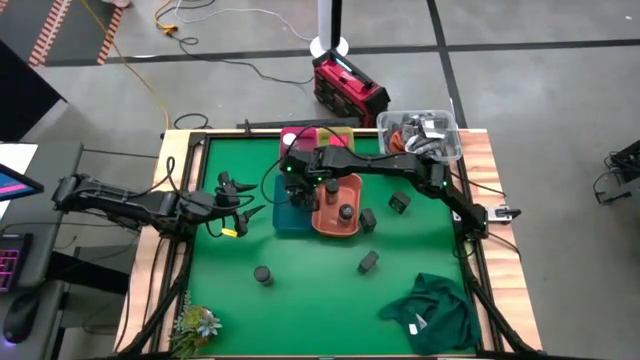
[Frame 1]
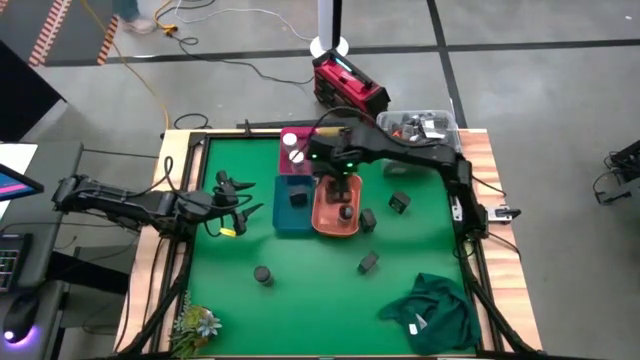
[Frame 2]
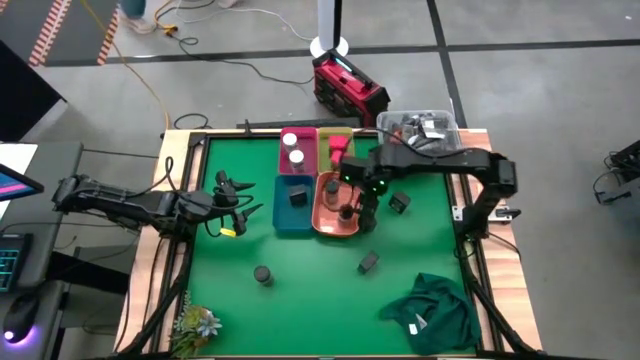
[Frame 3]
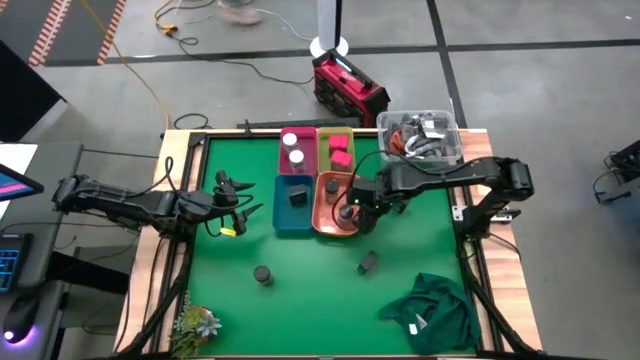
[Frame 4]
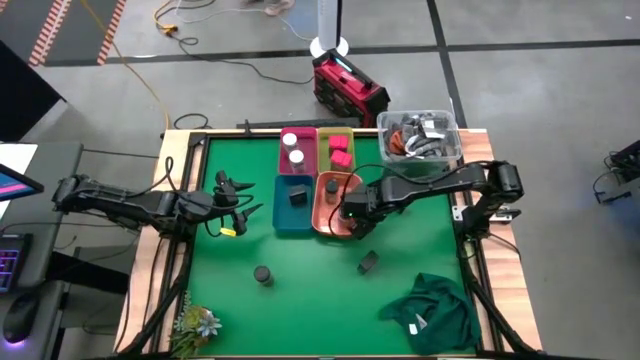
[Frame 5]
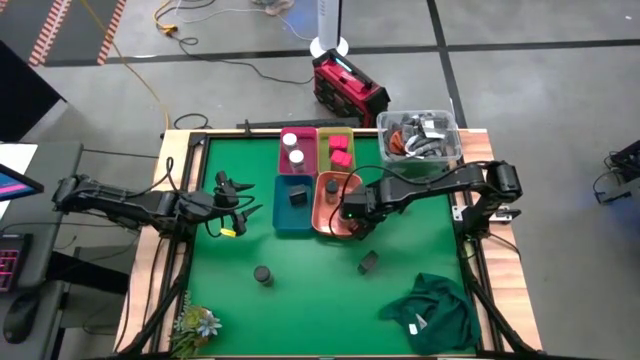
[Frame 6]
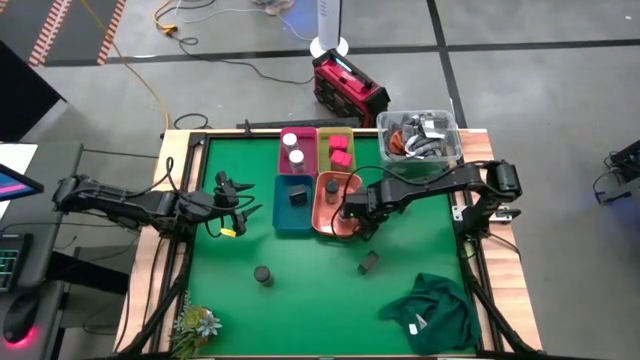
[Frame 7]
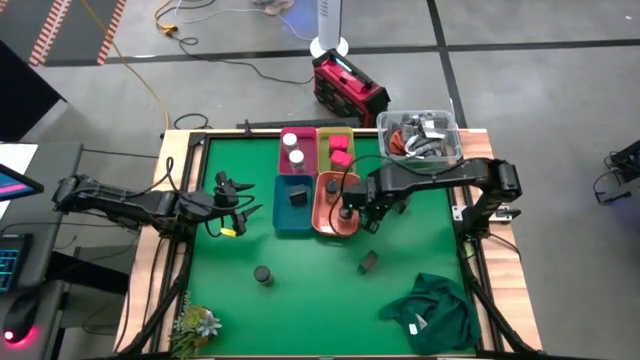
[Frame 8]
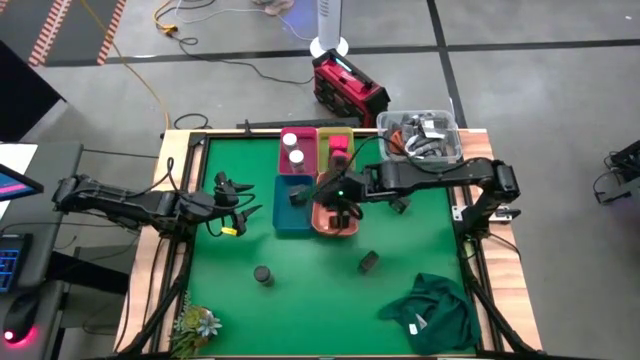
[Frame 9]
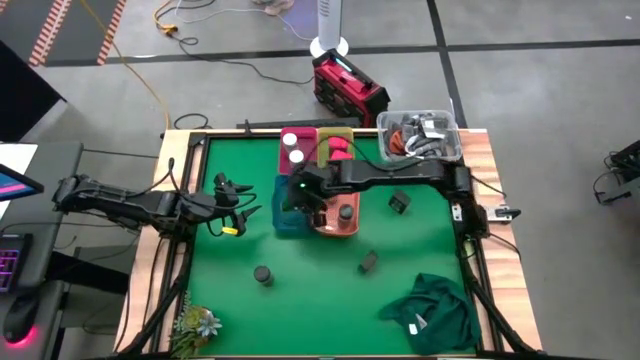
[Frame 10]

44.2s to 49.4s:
Task: Sort spices by type
Put the center black seasoning can into the blue tray

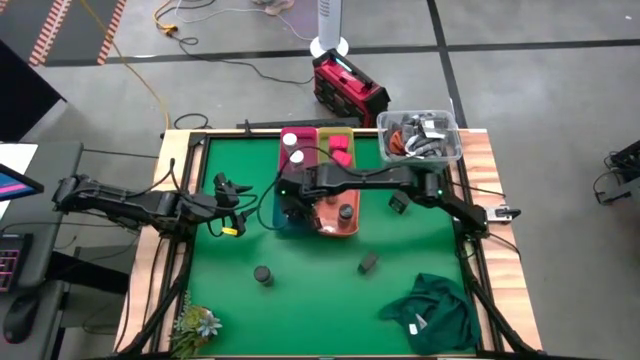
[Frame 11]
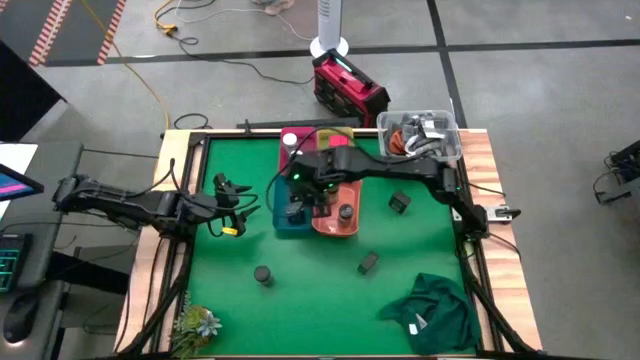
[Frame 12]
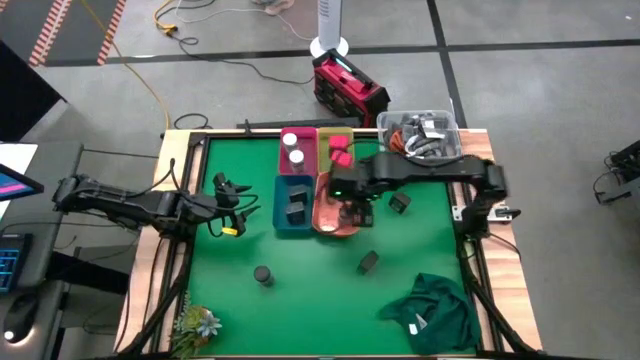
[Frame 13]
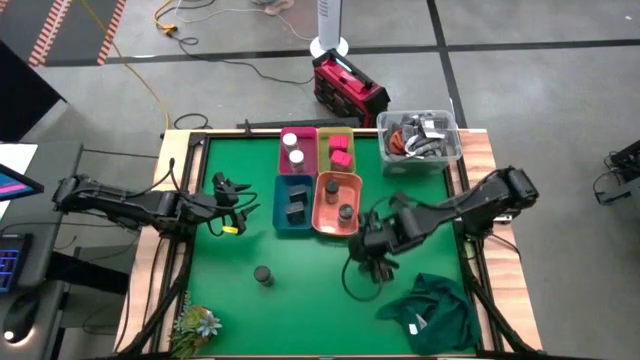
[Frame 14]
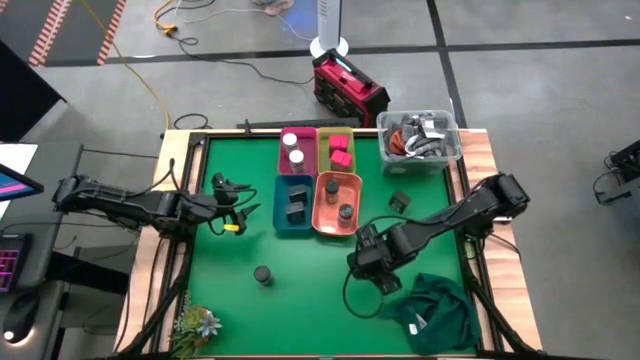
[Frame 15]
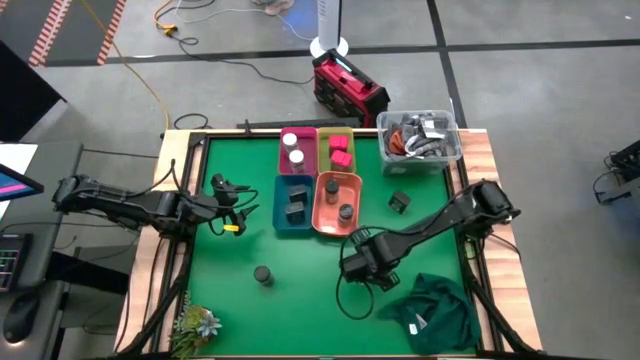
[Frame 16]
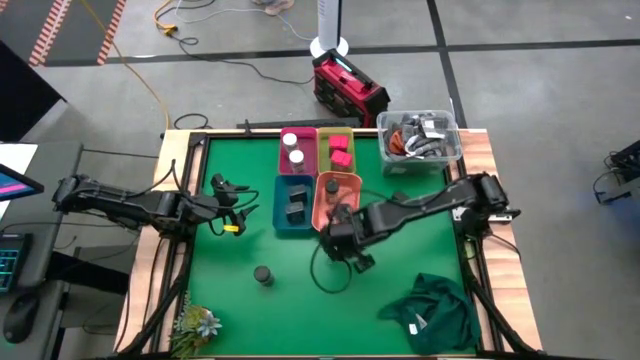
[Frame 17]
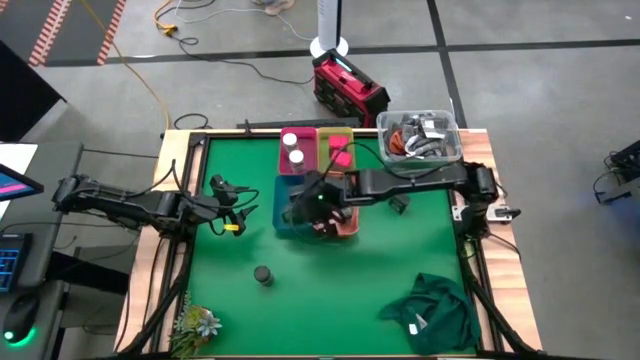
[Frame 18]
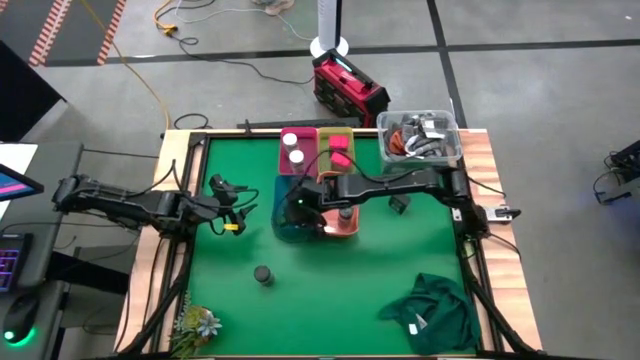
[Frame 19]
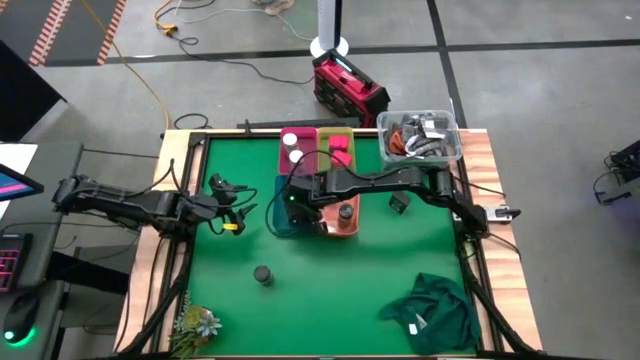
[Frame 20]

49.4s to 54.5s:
Put the bottom black seasoning can into the blue tray

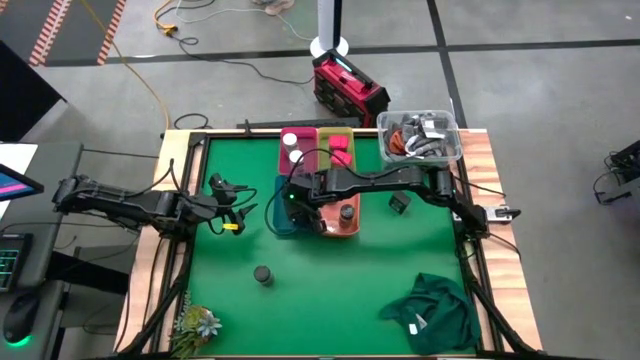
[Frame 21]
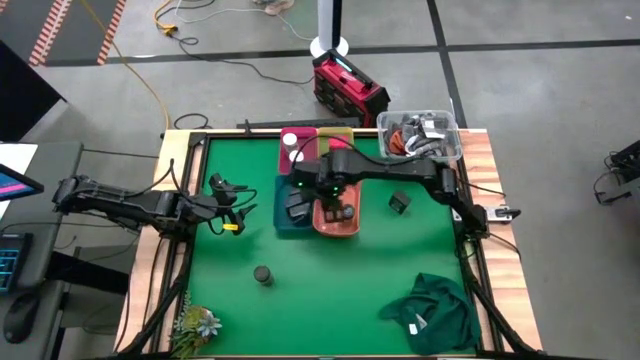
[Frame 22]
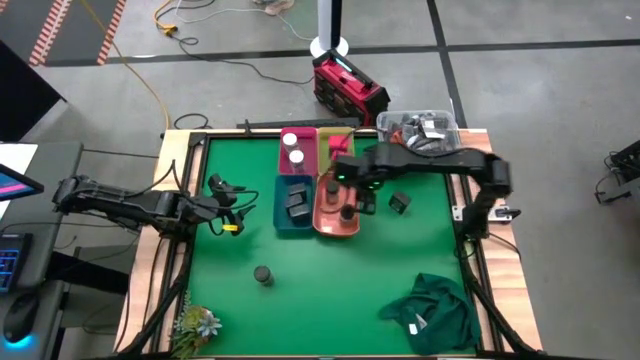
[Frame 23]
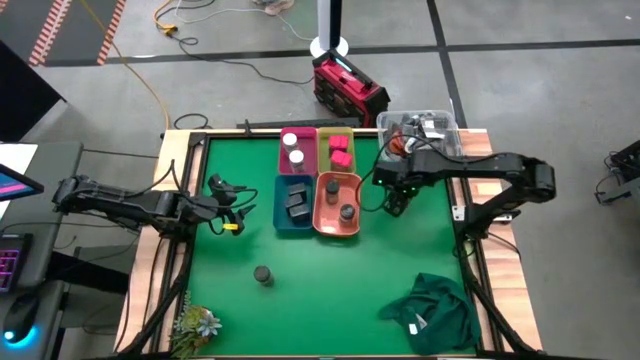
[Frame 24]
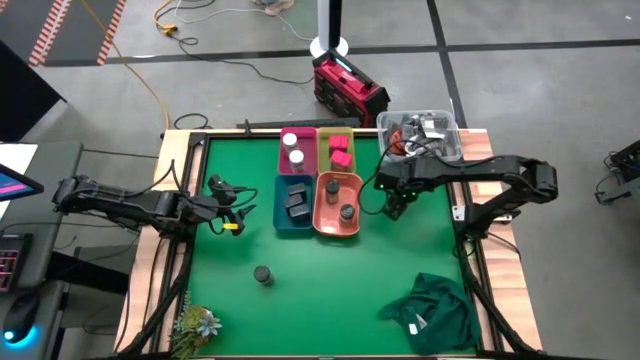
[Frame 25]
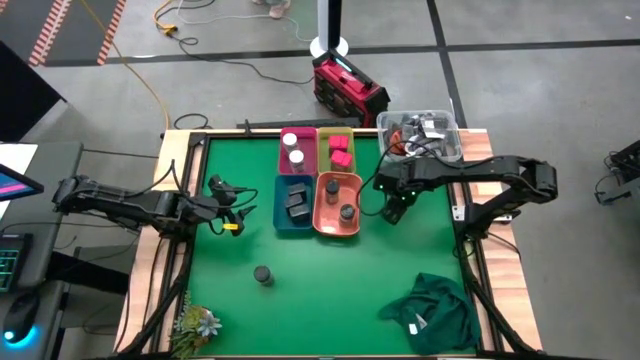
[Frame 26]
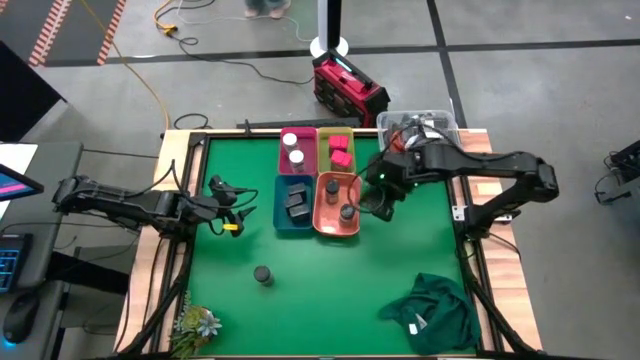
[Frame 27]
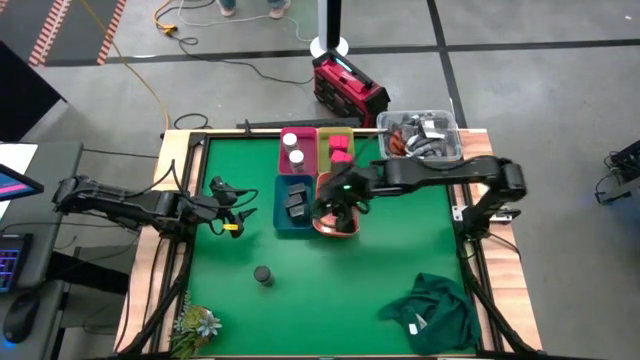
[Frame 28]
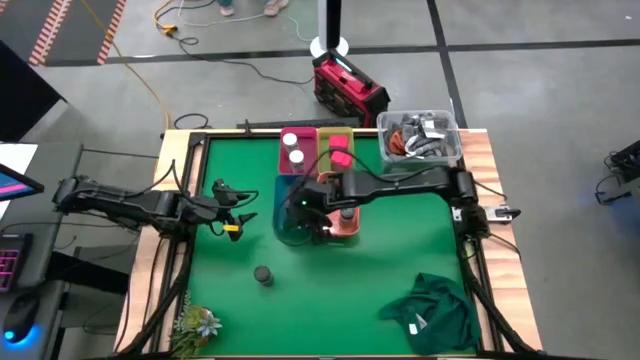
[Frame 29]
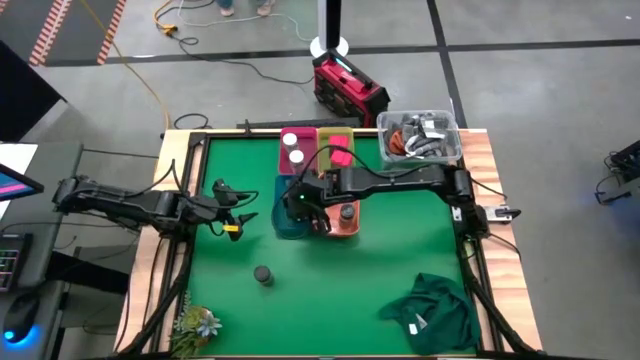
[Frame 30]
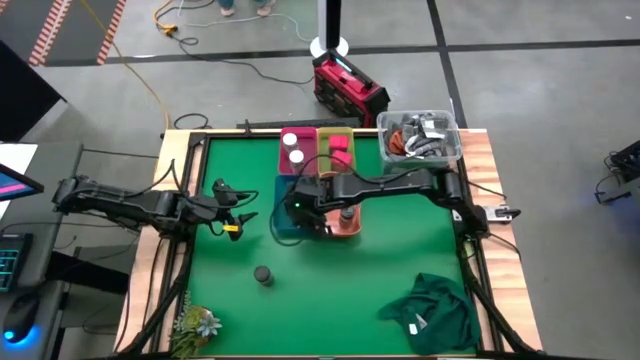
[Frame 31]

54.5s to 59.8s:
Put the black seasoning can into the blue tray

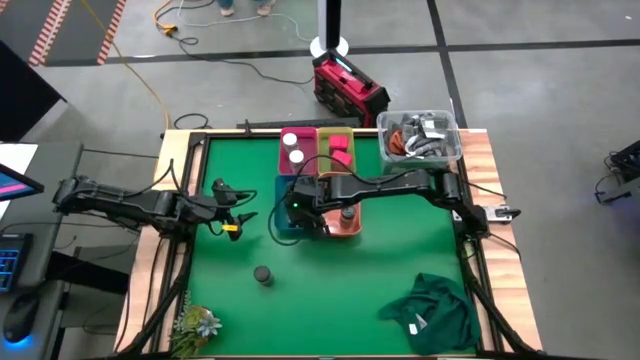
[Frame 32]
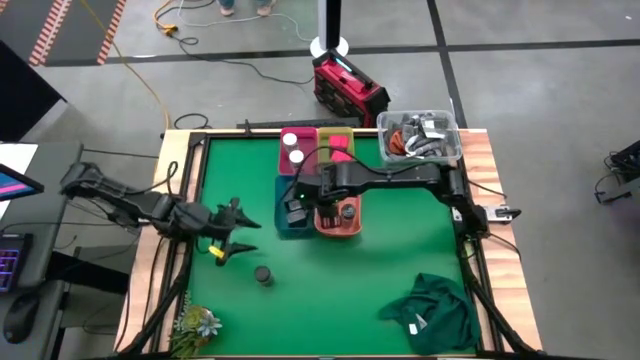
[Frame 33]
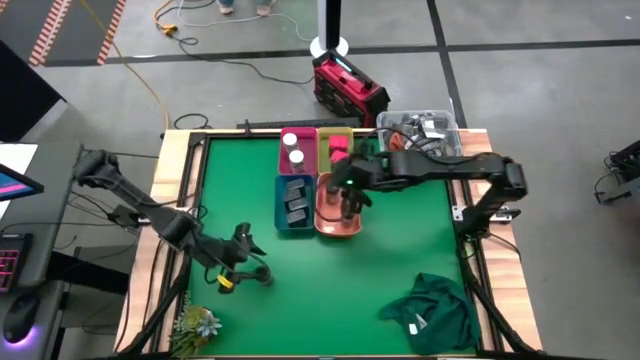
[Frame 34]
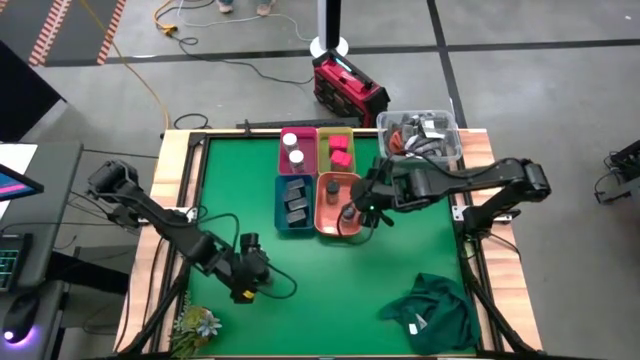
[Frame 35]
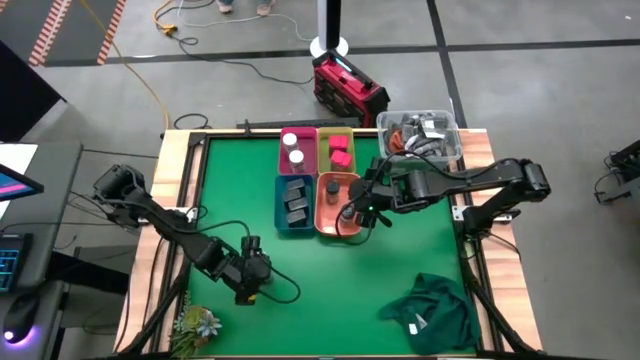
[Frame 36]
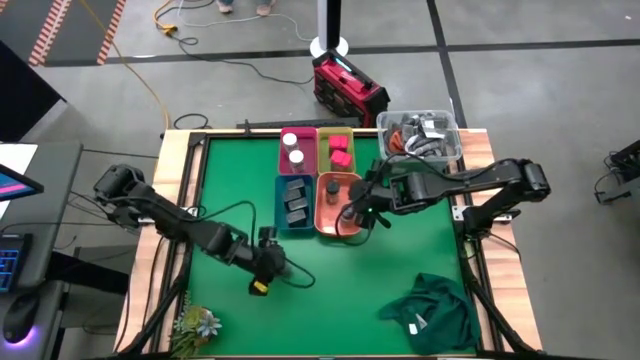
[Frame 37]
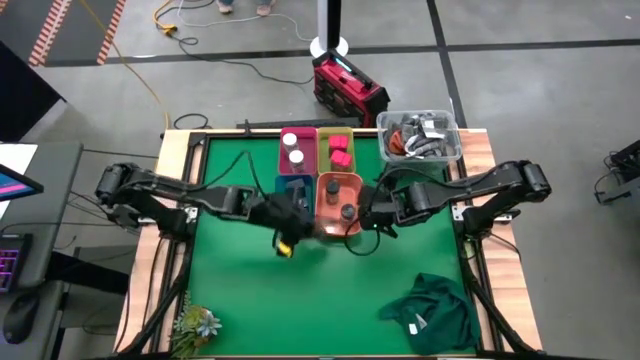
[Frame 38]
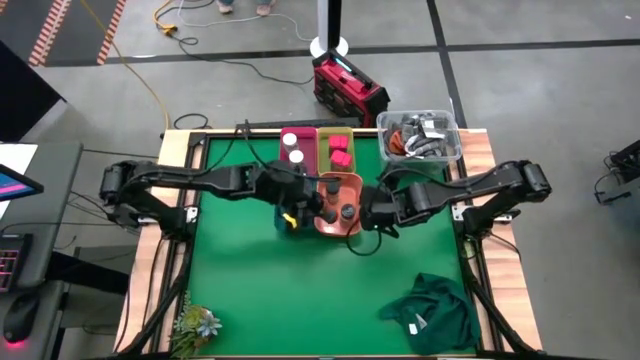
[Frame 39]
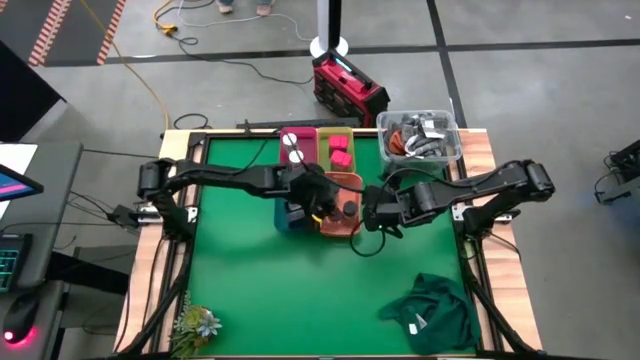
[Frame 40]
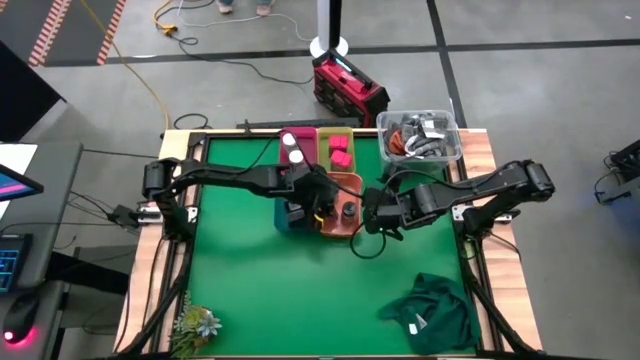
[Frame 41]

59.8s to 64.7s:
Put the black seasoning bottle into the orange tray

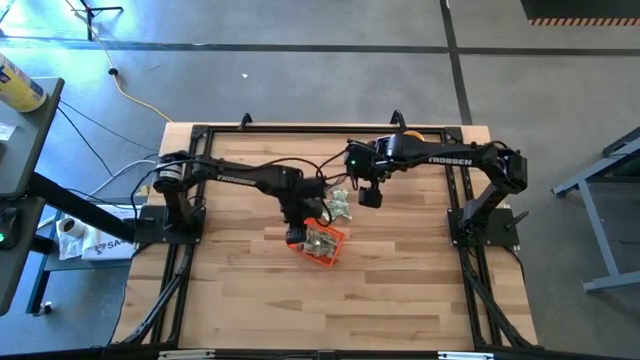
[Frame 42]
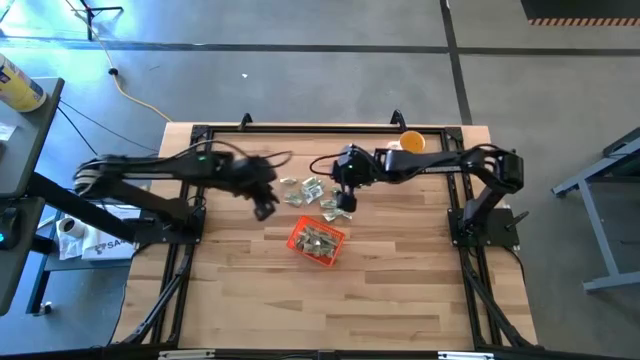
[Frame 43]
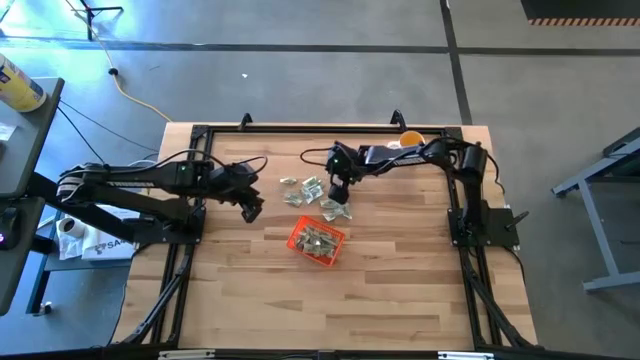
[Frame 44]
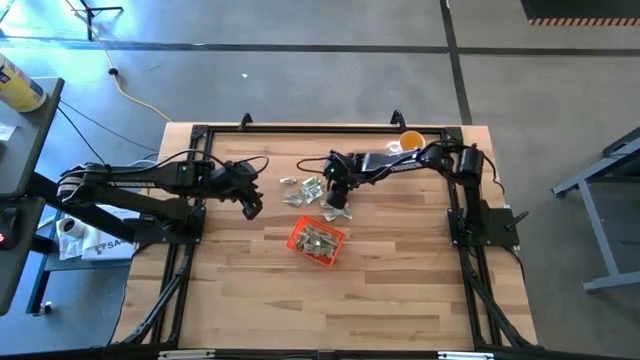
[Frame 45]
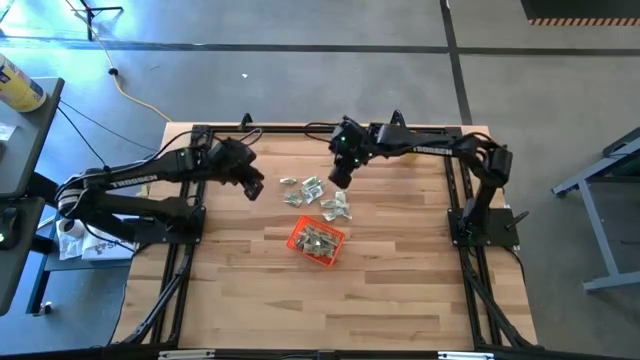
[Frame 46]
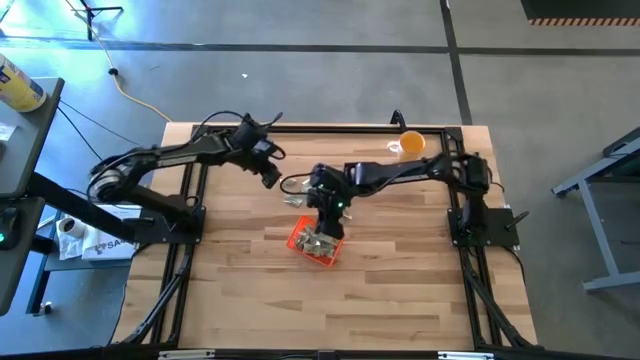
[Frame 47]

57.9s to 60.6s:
Task: Pick and place Stevia / Truvia into bins
Put the stevia packet into the orange bin
